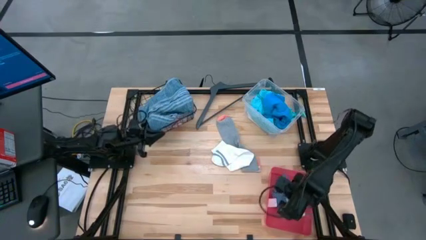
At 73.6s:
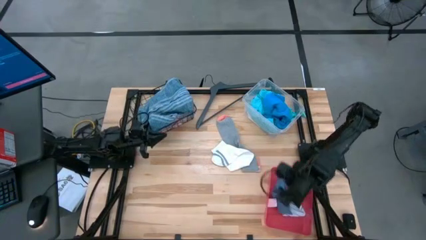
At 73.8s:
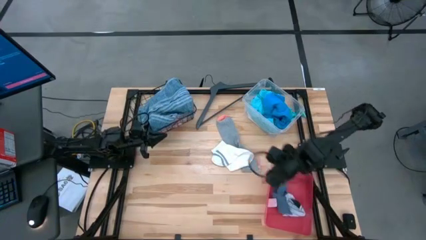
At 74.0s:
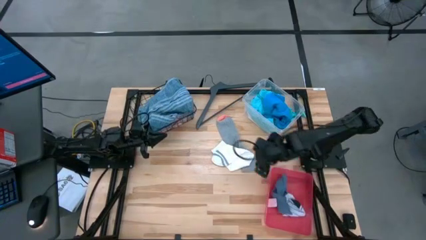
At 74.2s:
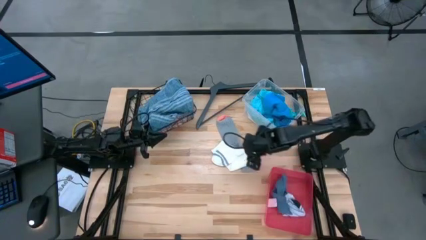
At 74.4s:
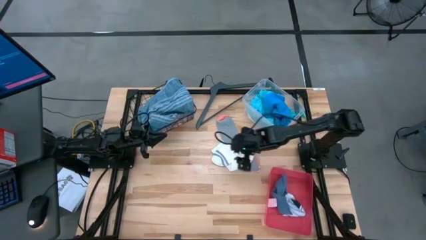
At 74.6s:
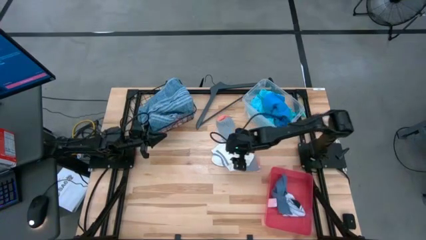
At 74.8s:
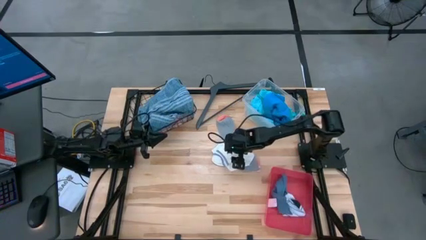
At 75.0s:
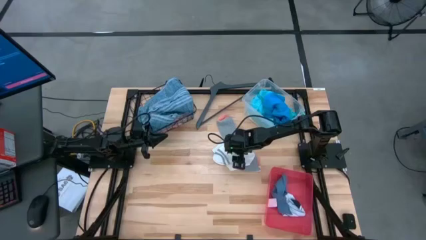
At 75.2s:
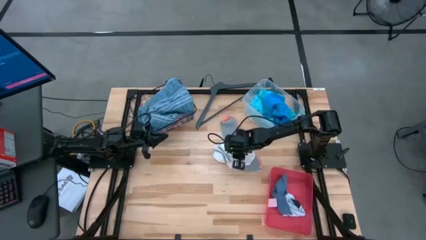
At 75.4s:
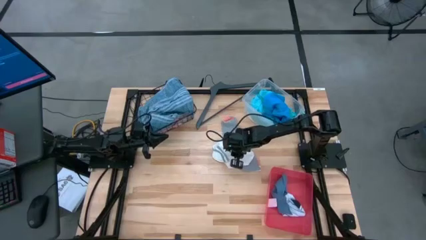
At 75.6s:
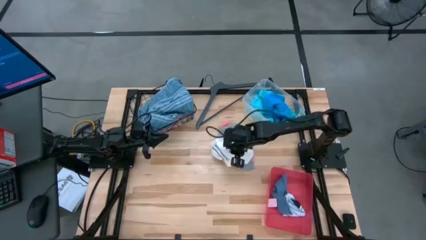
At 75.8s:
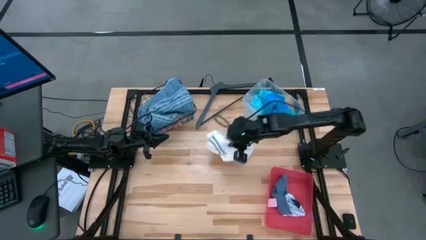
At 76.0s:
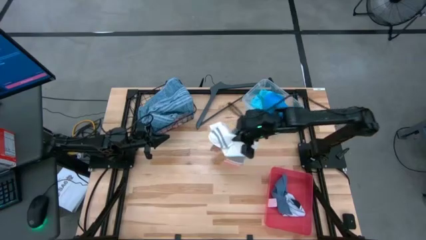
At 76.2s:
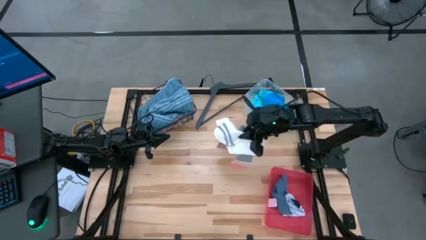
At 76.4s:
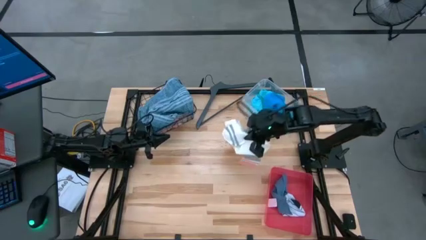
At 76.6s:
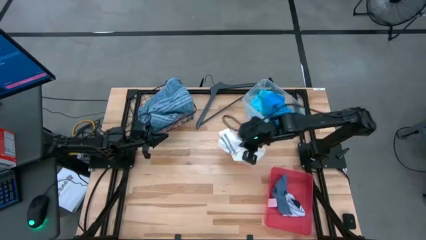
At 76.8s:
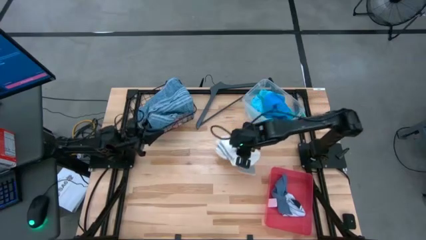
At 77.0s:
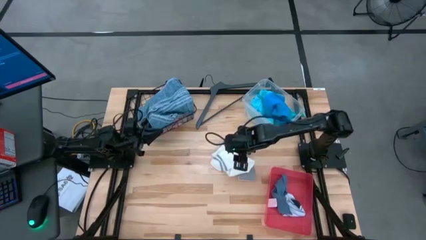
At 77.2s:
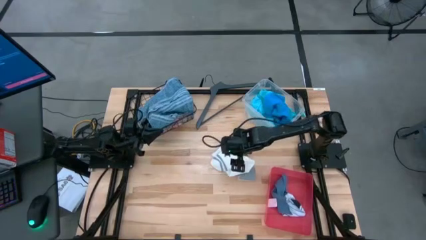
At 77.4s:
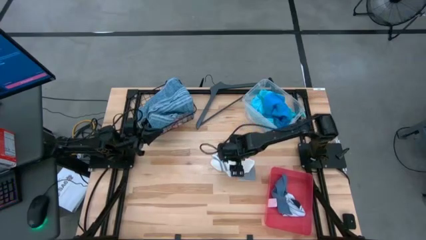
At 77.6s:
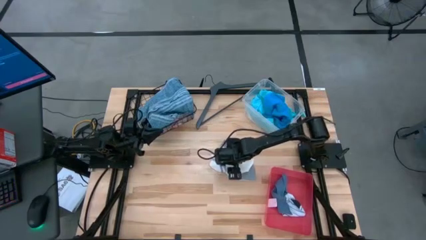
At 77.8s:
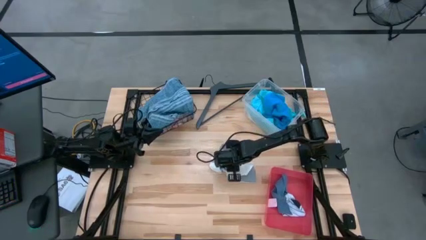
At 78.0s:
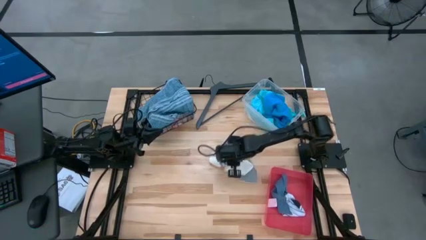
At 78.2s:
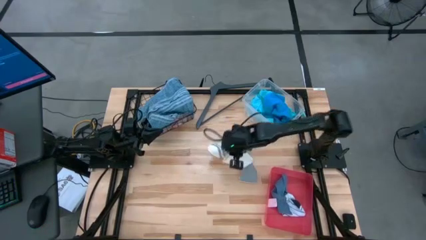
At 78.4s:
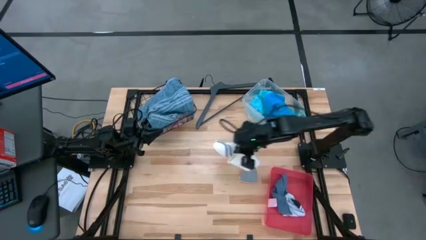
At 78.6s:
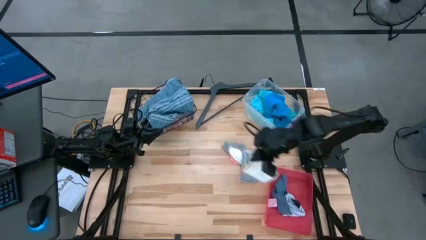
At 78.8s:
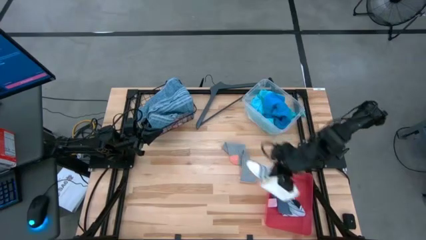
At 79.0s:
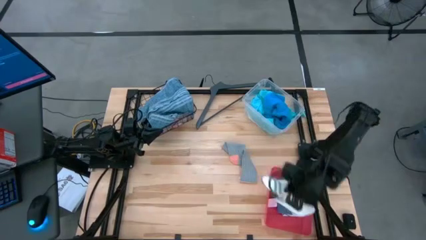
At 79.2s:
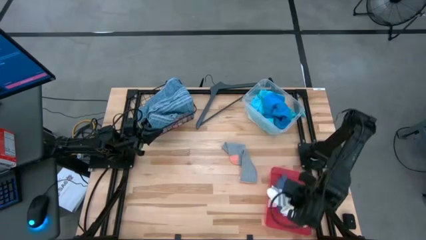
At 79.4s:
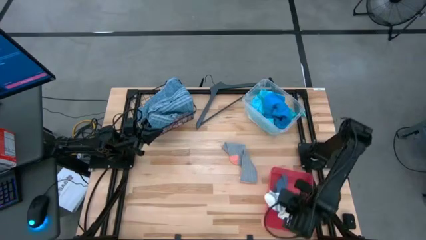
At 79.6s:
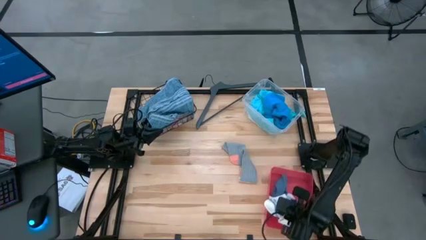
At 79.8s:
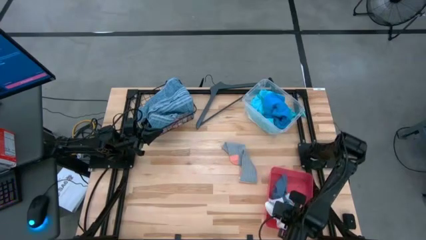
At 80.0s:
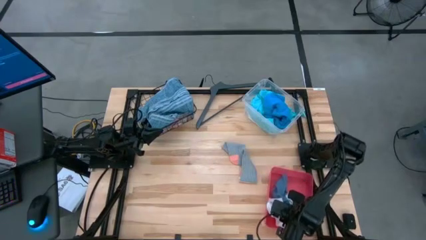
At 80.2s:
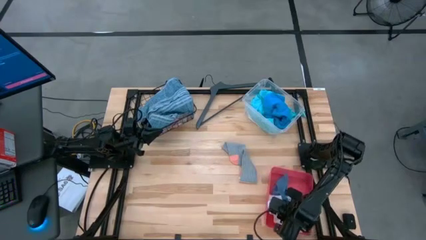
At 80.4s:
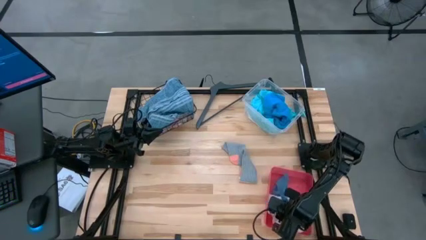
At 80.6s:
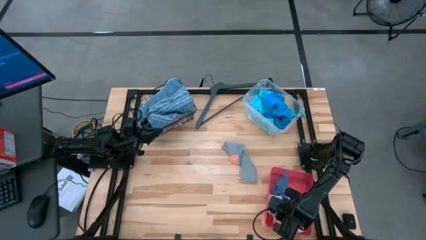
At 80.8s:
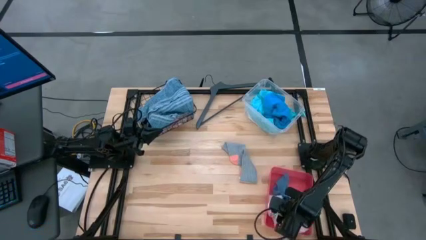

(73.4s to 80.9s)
Task: Pick & Place Cloths
Put the white sock into the pink bin

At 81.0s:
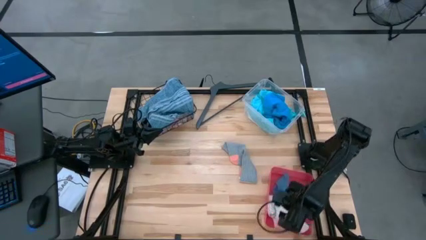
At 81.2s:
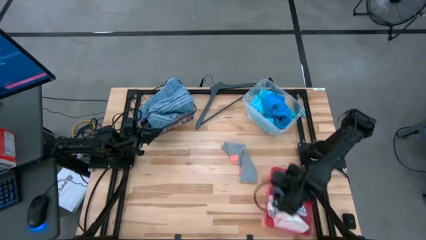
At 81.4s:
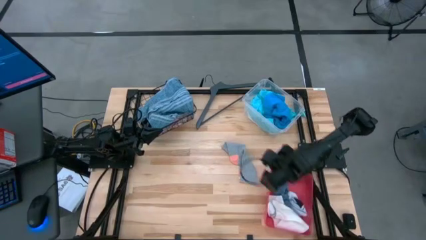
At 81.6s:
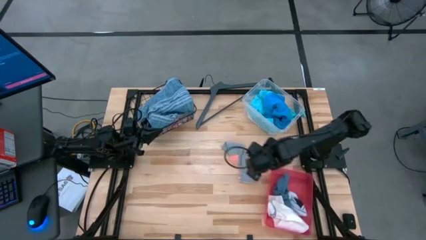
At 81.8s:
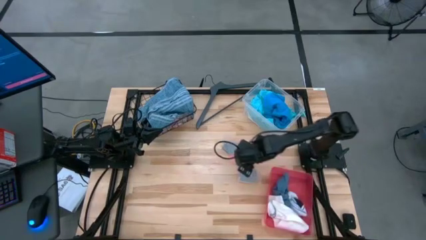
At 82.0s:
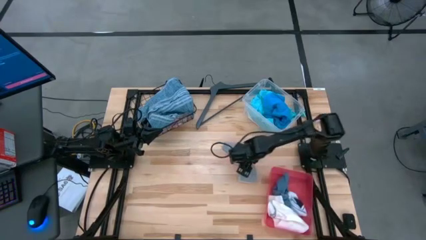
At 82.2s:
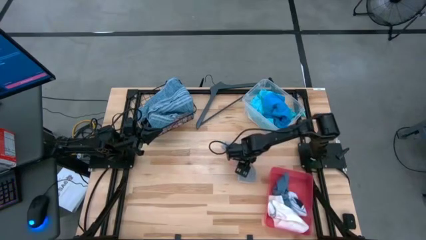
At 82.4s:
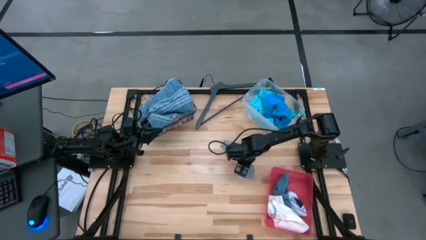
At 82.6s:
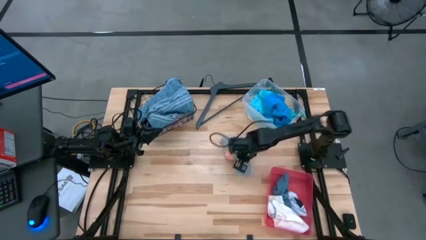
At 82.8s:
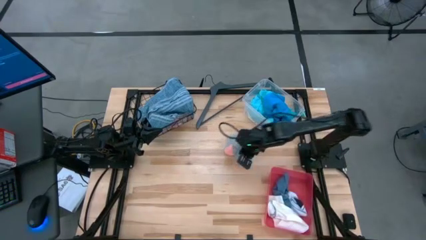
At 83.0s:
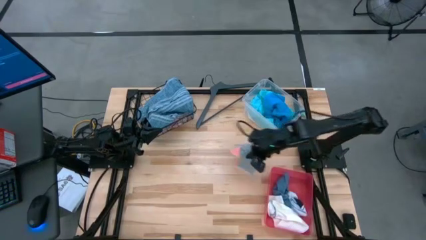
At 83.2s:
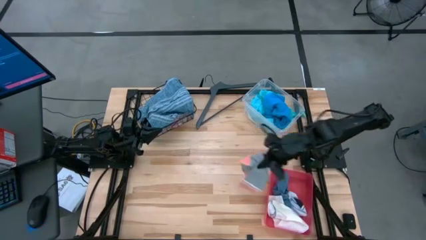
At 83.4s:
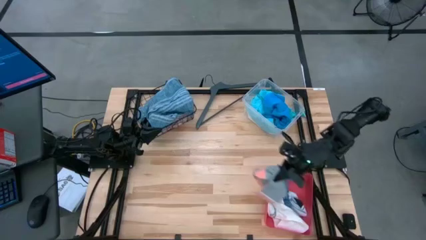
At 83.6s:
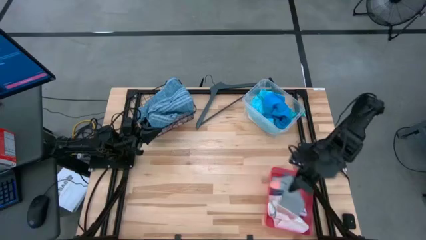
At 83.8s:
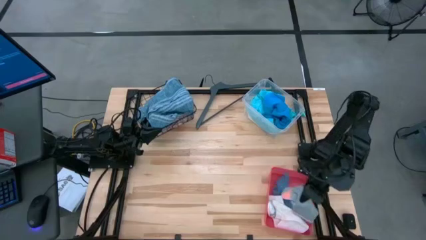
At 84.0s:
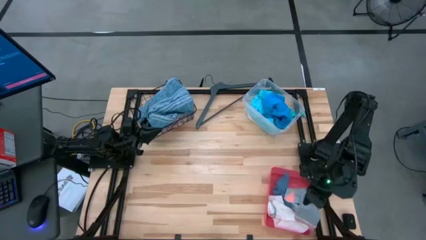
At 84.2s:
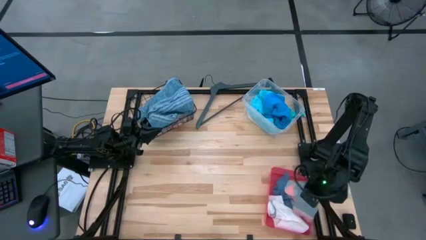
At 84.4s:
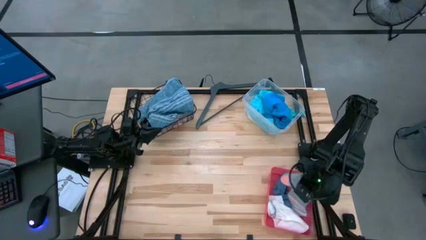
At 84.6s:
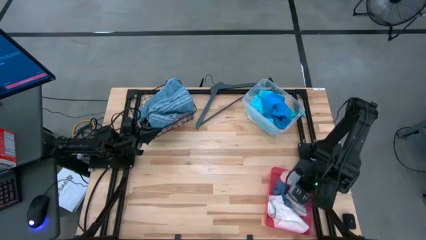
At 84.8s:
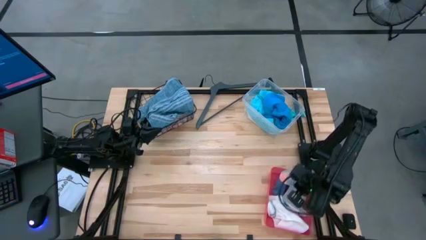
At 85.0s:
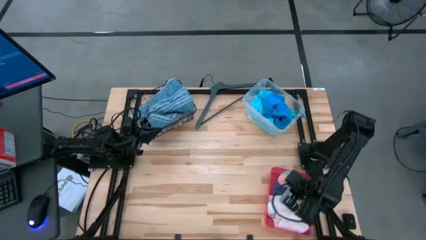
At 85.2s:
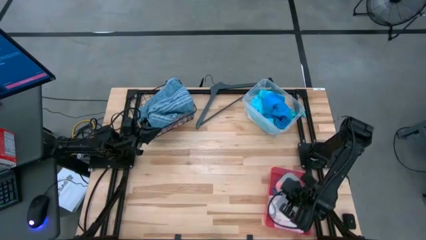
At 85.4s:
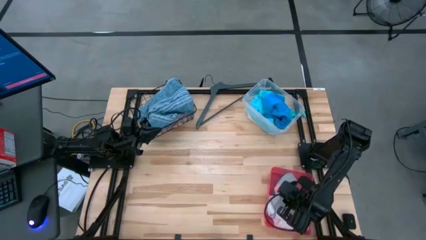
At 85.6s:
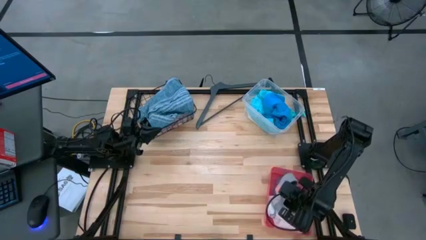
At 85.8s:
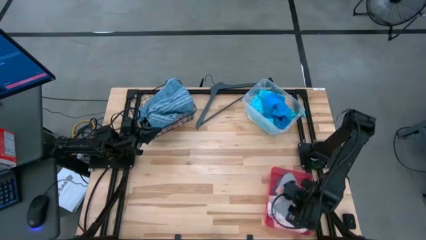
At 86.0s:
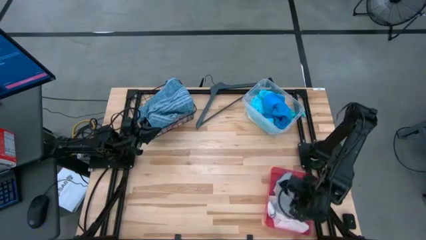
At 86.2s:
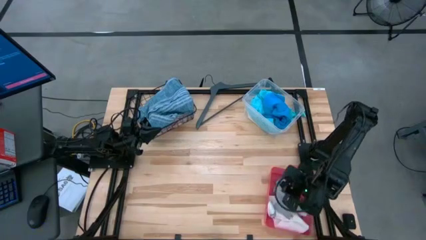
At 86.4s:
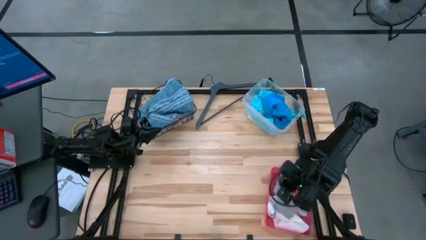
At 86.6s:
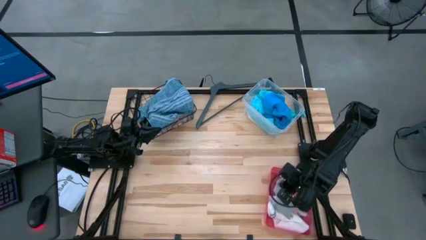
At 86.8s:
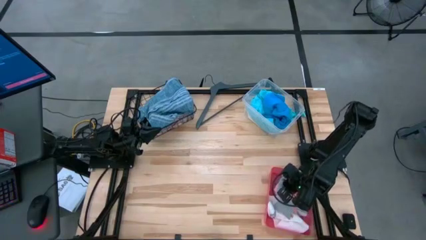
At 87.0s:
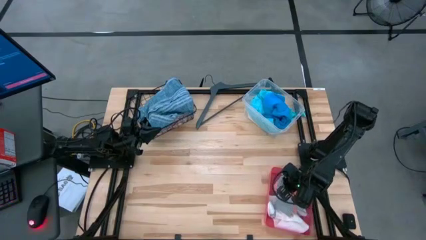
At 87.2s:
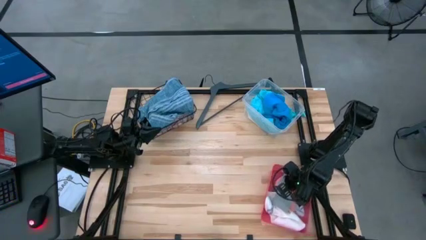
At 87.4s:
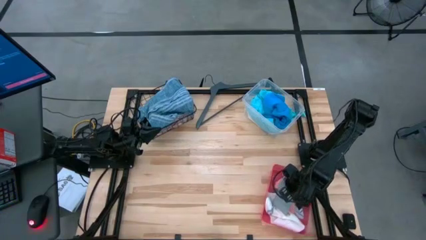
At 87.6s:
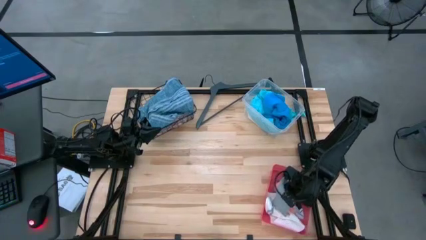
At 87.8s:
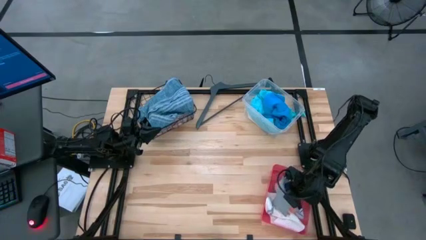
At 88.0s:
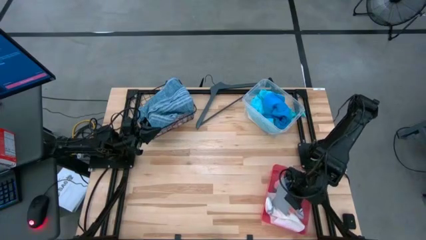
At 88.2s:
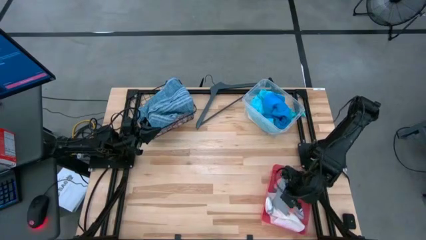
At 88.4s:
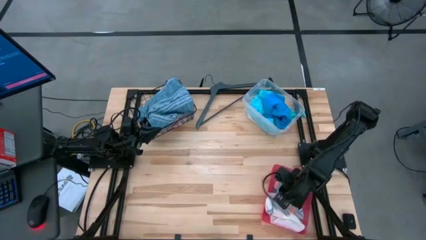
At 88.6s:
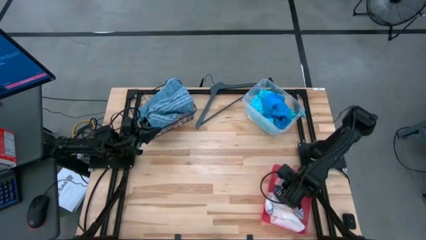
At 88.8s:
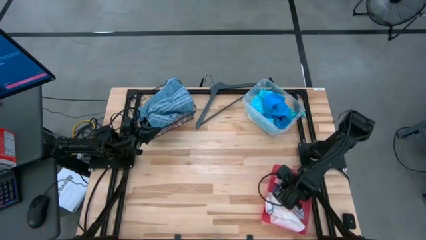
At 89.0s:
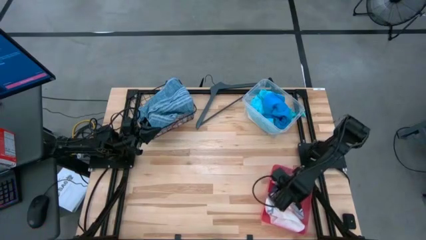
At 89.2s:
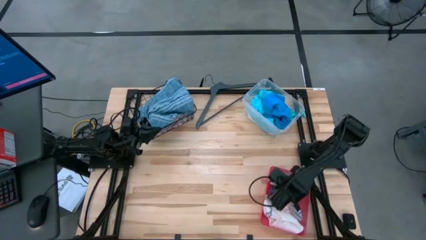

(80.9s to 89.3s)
Put the gray sock into the pink bin
